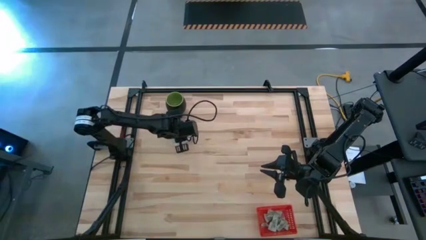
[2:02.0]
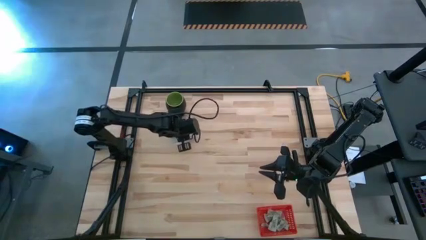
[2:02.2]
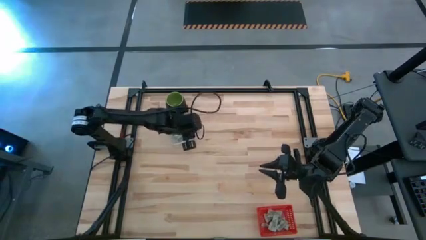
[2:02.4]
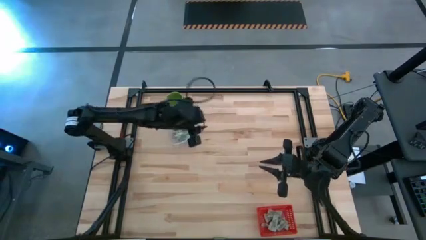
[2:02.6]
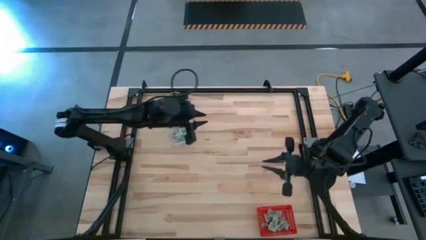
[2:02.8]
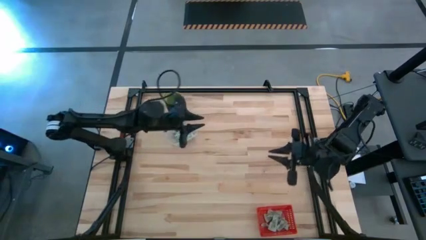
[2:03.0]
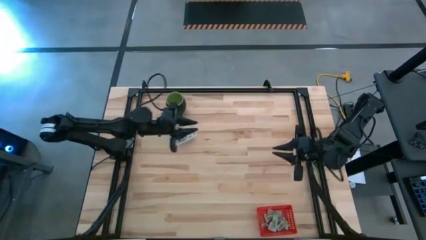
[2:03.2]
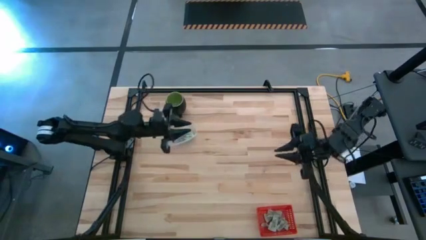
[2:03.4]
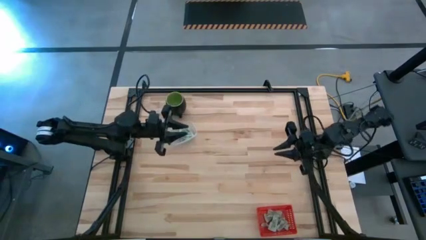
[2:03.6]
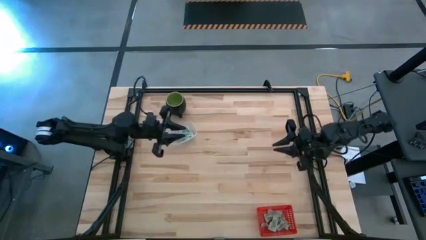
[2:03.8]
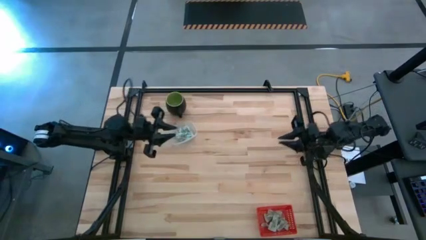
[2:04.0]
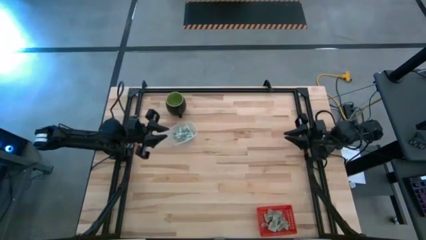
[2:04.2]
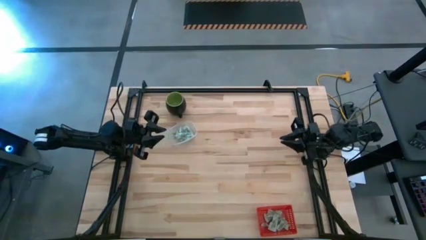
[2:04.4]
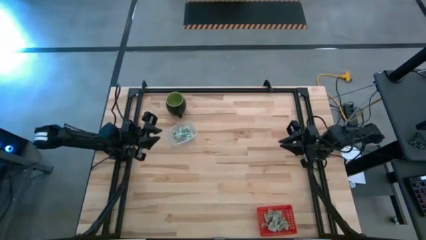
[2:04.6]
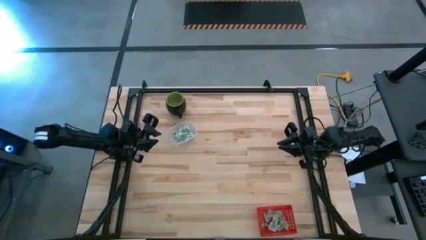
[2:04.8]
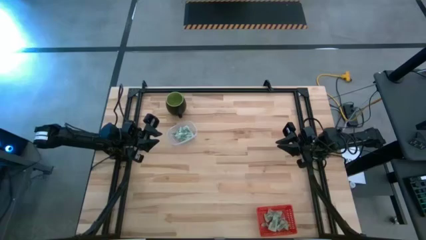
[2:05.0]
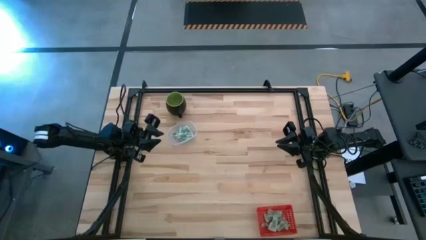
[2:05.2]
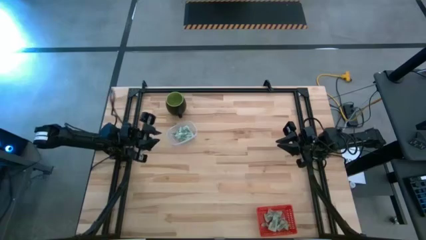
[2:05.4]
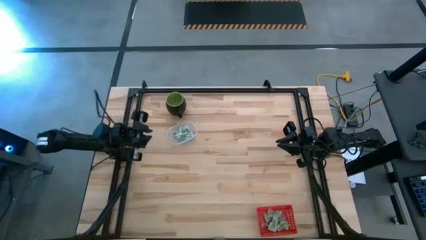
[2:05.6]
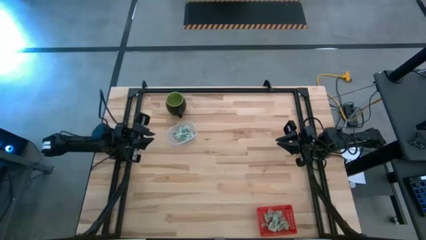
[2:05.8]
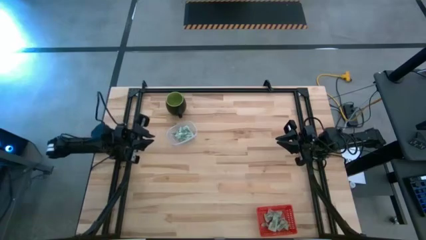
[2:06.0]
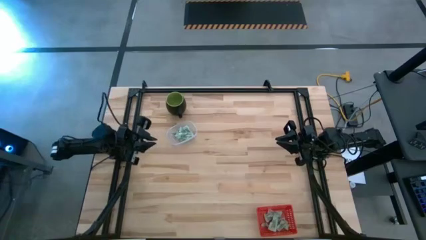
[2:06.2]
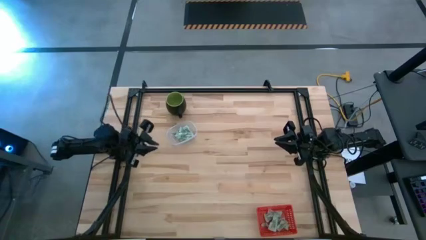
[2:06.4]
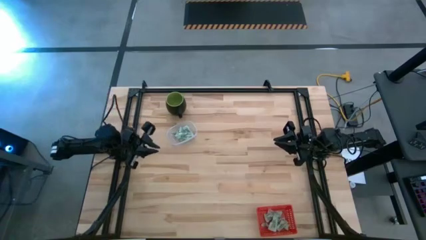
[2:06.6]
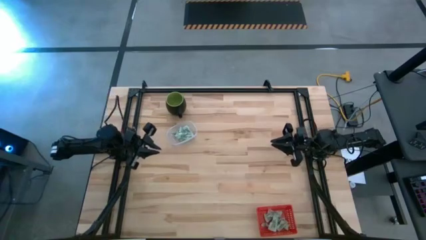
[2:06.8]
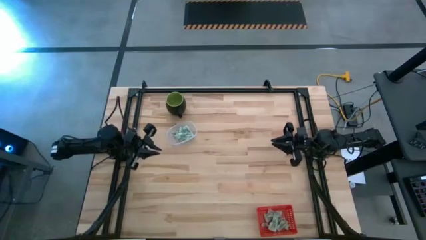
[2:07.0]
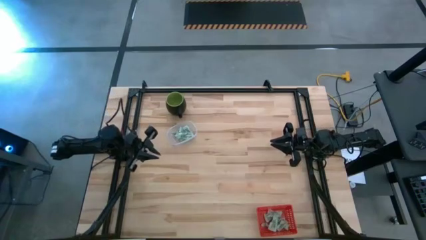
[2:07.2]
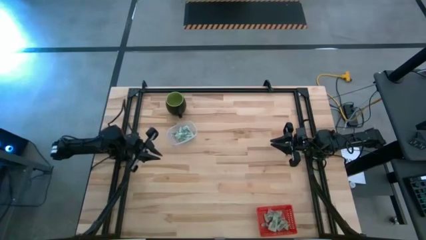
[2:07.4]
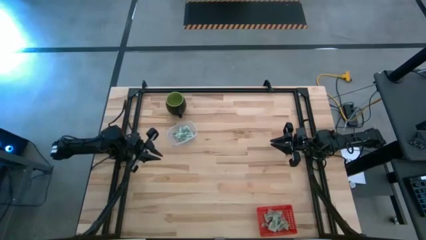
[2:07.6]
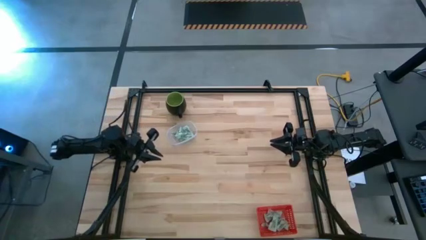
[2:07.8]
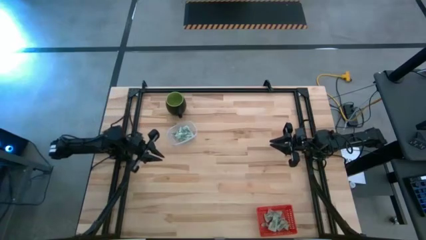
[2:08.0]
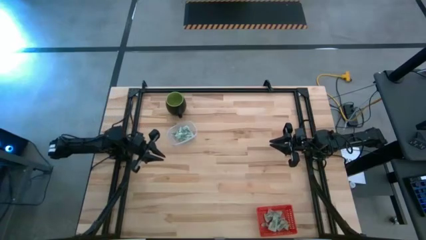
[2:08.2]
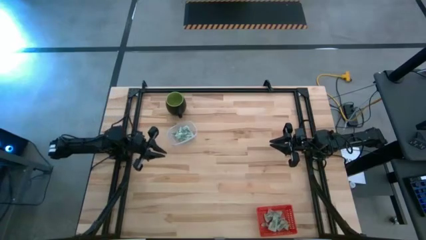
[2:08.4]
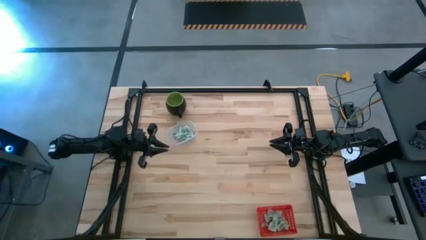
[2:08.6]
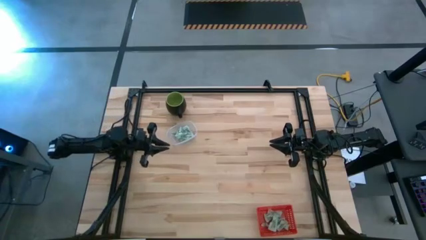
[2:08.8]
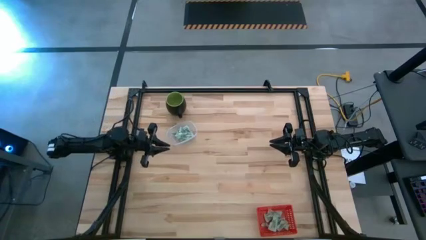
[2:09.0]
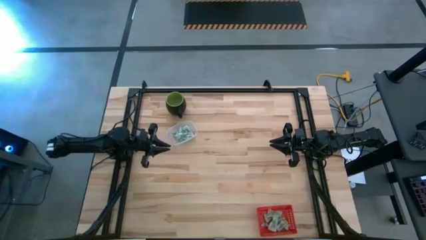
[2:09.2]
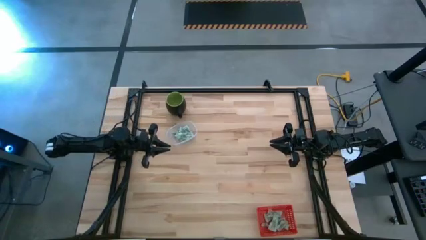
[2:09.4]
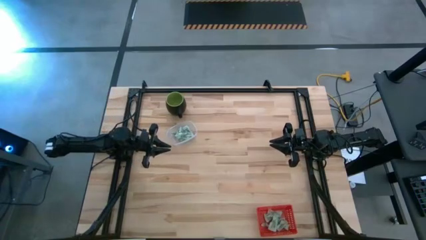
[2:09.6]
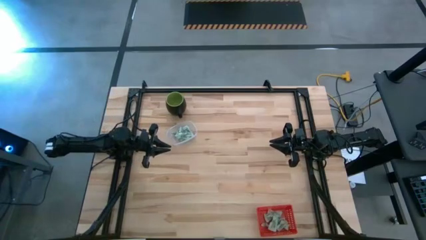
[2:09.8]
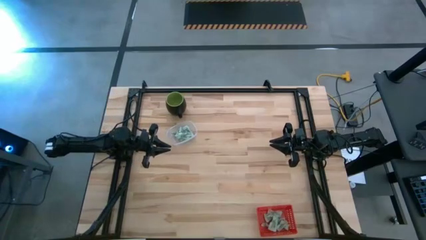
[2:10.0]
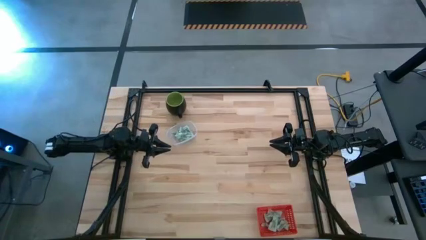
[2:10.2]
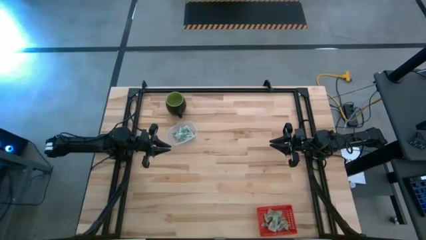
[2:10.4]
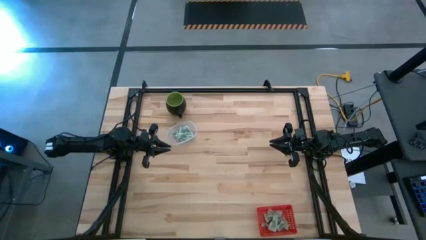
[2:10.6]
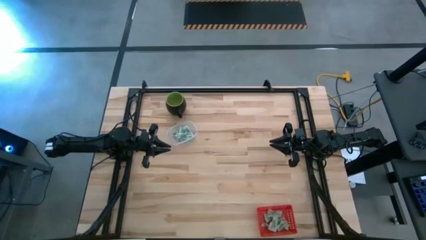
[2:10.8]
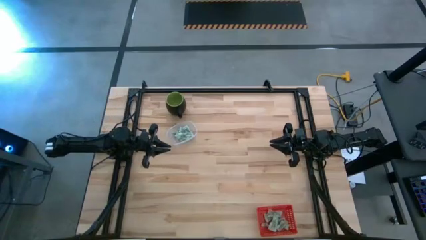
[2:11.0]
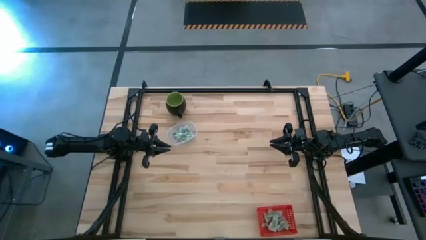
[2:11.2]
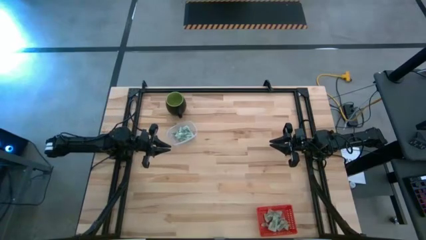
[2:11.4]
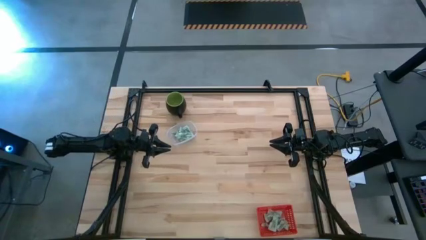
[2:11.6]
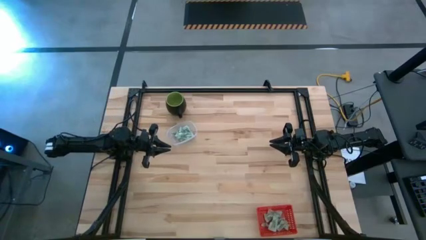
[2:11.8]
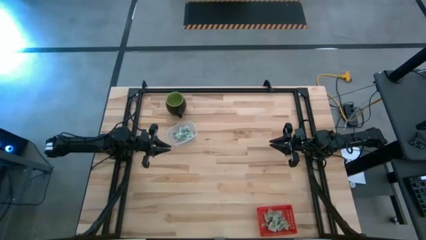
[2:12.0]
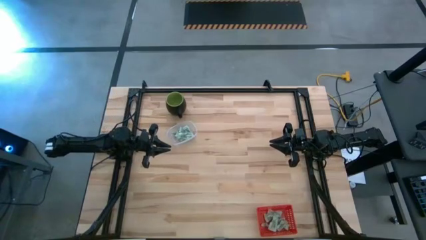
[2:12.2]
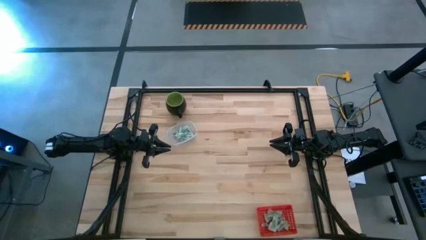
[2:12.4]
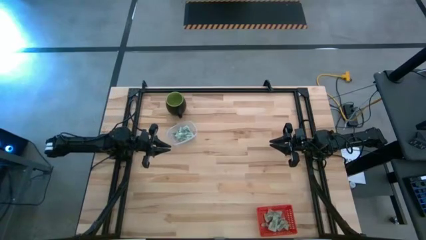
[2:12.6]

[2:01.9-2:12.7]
Task: Pick and place items into bin
Return to Home Position

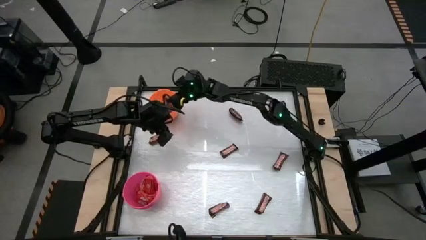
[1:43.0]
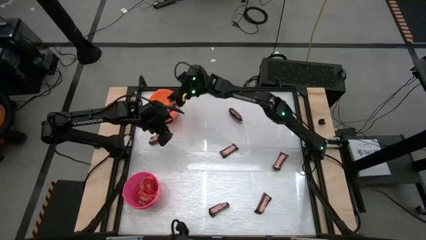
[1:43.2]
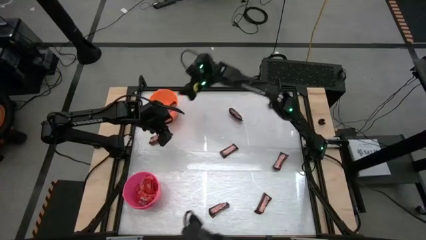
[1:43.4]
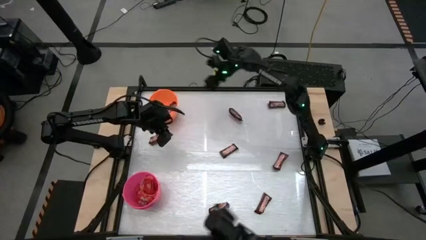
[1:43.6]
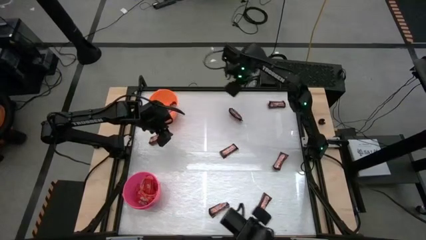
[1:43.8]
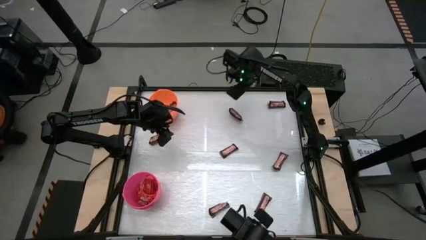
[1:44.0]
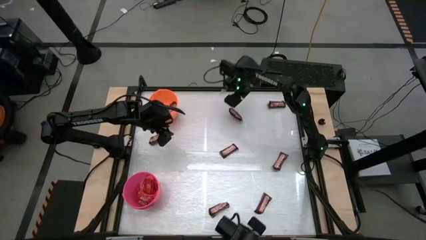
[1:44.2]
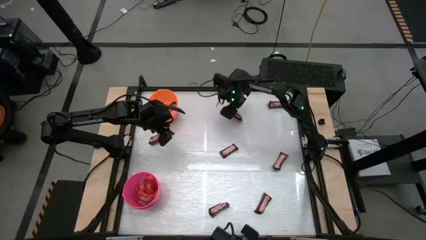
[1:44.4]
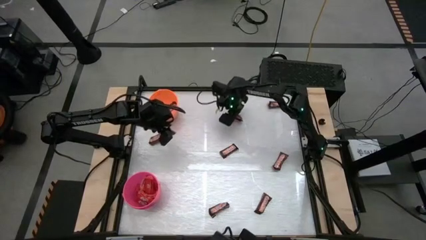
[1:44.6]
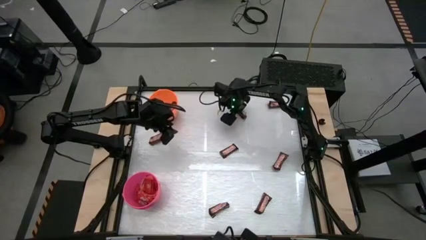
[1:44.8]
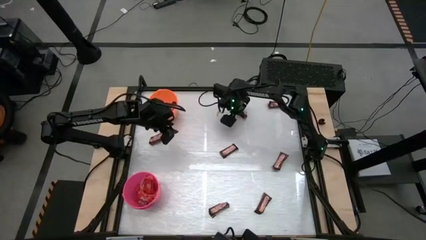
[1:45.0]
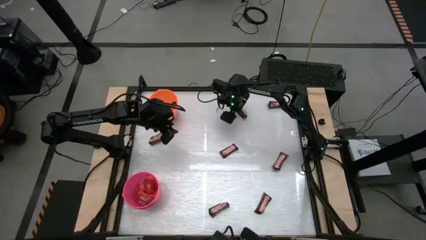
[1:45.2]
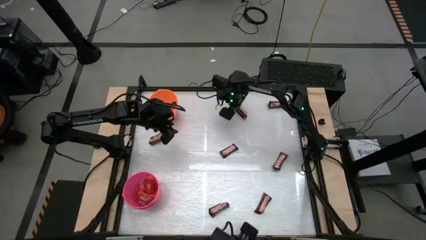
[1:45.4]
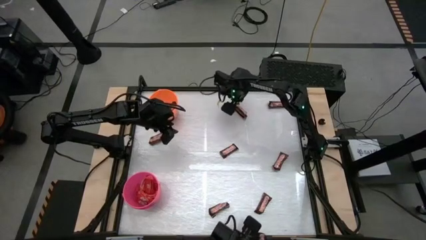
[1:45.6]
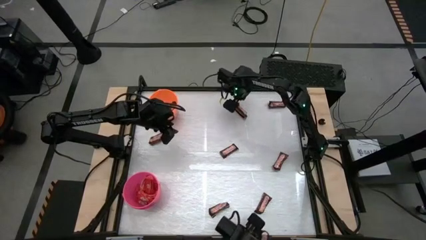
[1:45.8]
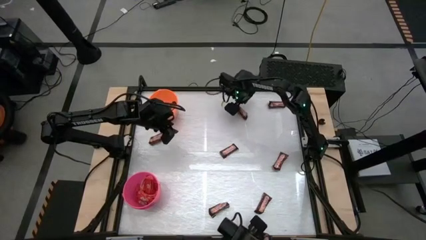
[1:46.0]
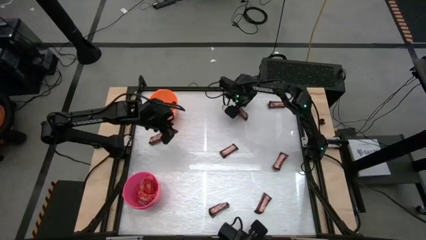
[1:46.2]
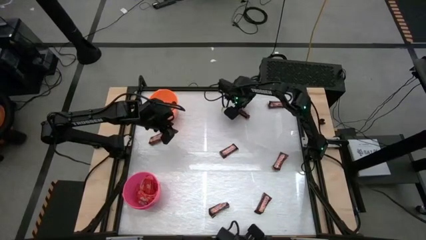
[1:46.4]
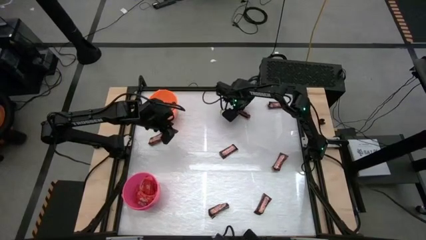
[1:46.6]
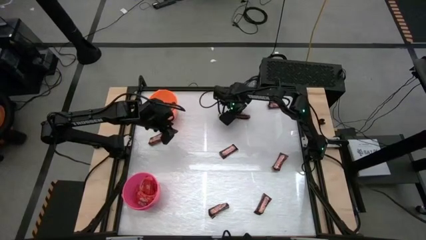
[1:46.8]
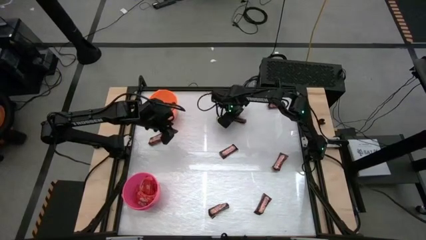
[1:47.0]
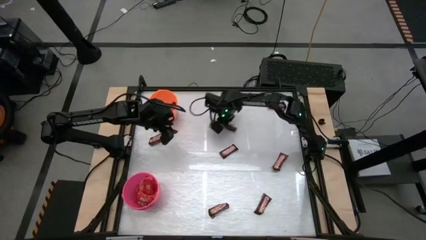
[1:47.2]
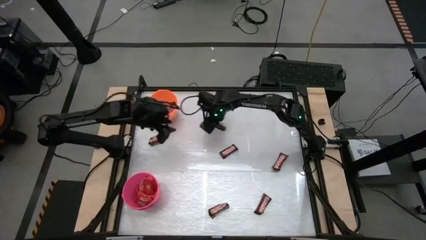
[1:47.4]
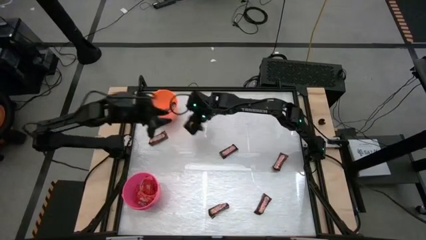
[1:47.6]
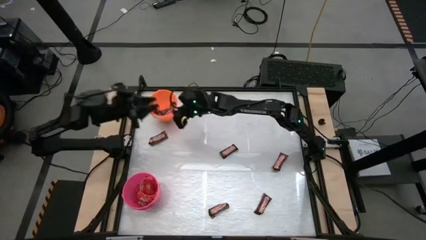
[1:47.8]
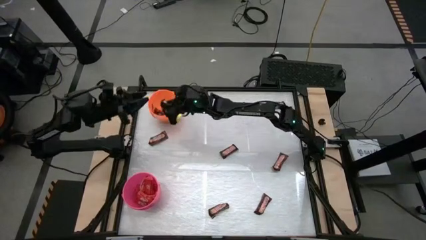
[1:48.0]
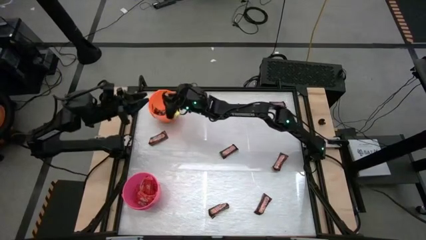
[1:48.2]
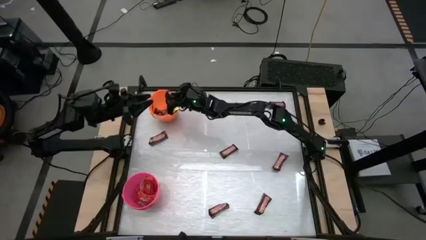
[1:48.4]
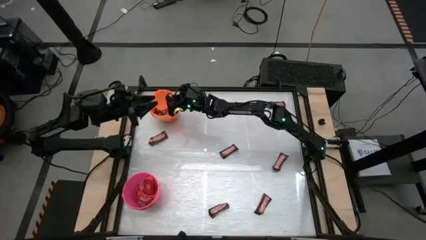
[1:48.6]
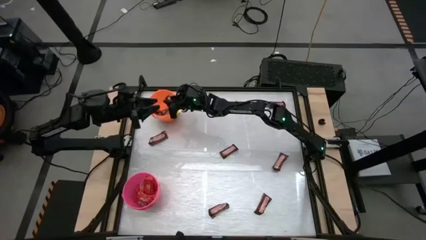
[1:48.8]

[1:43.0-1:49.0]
Task: Sort candy by brand, put in halloween buckets
Put the brown chocolate bar into the orange bucket
